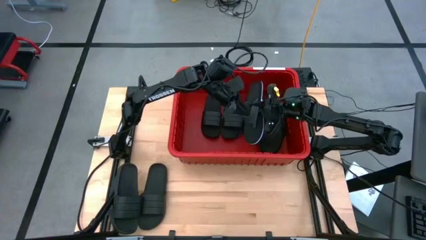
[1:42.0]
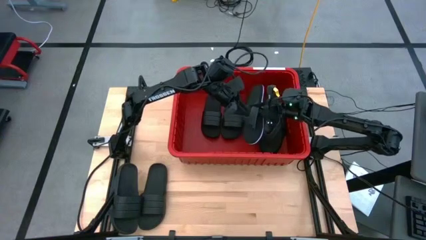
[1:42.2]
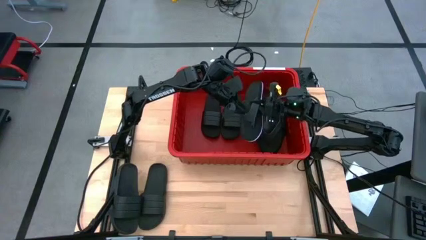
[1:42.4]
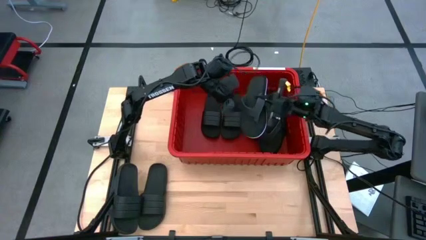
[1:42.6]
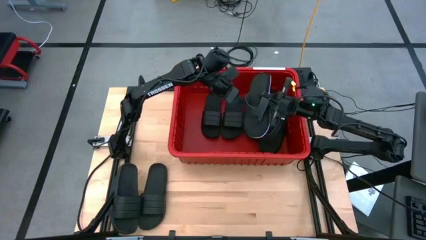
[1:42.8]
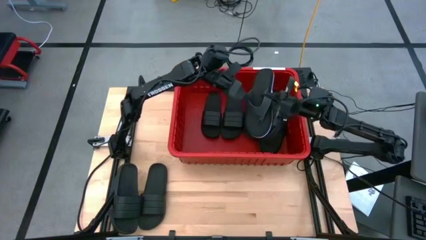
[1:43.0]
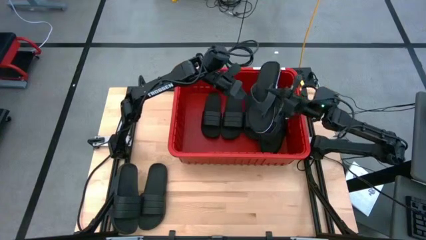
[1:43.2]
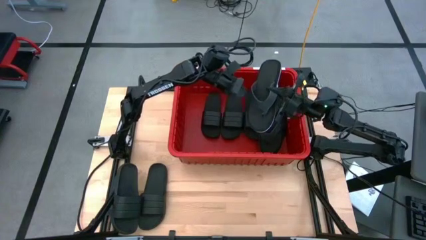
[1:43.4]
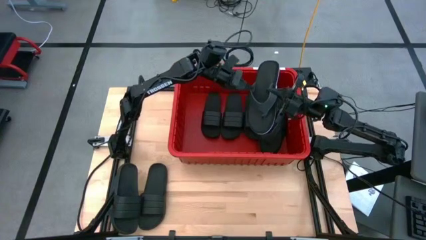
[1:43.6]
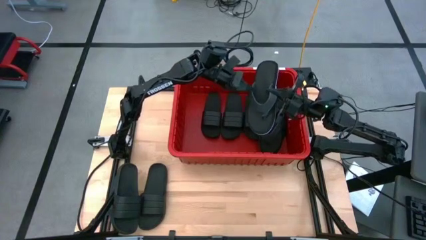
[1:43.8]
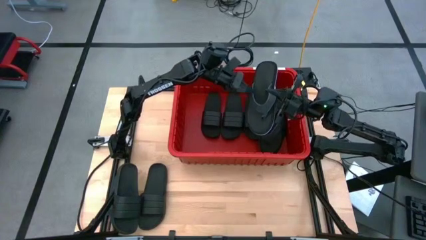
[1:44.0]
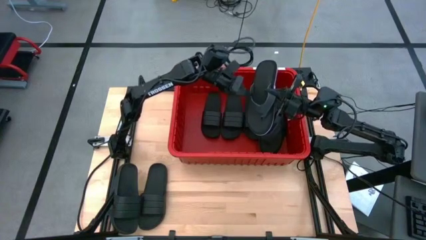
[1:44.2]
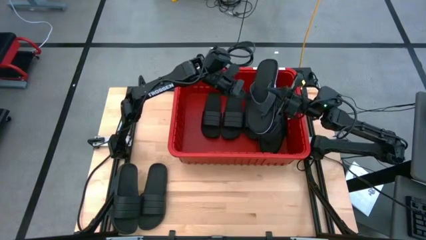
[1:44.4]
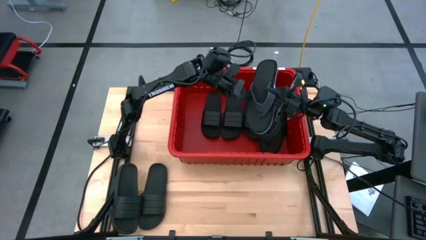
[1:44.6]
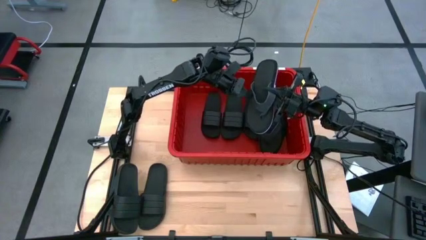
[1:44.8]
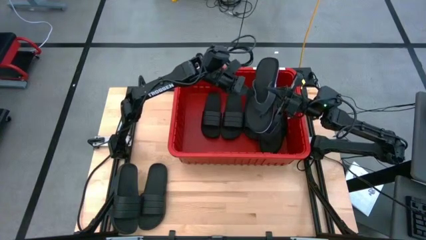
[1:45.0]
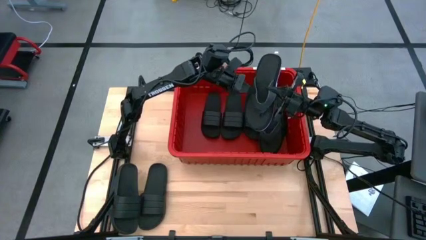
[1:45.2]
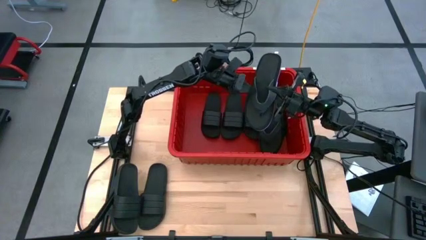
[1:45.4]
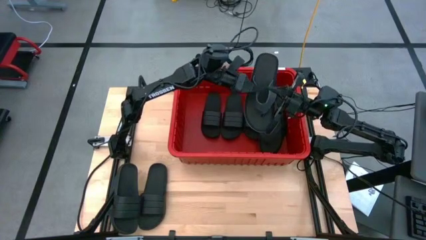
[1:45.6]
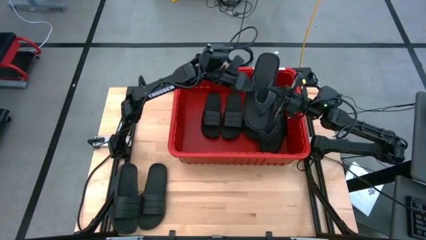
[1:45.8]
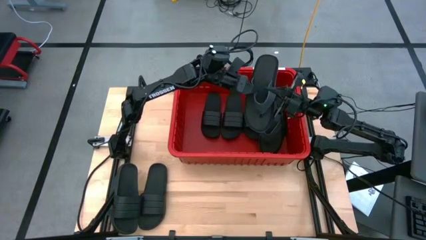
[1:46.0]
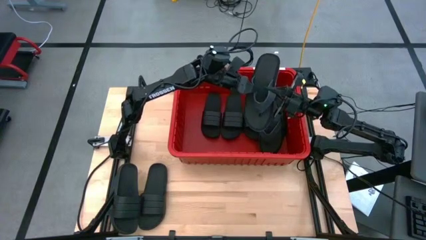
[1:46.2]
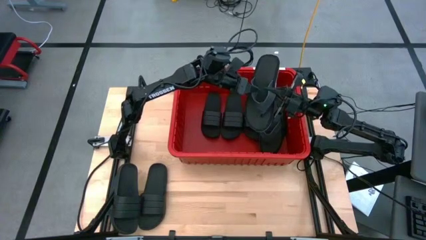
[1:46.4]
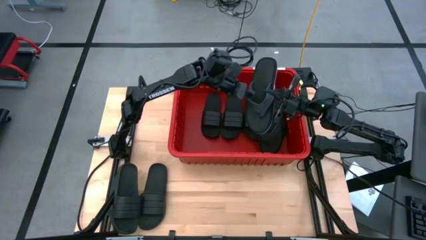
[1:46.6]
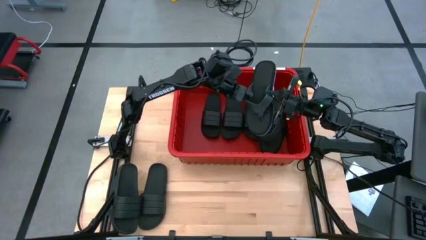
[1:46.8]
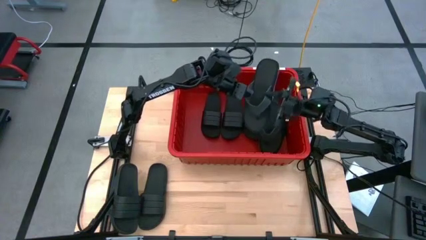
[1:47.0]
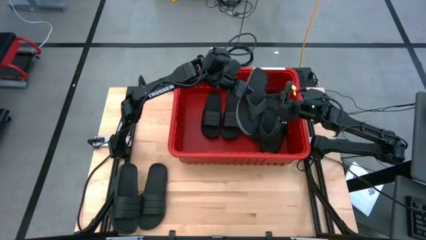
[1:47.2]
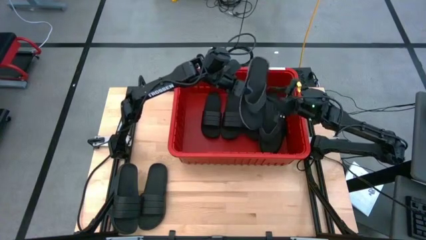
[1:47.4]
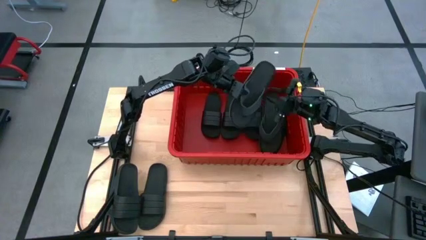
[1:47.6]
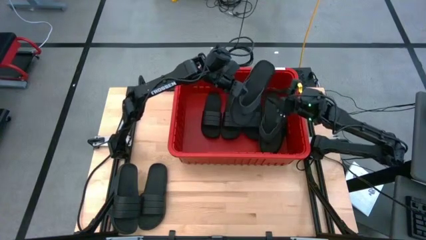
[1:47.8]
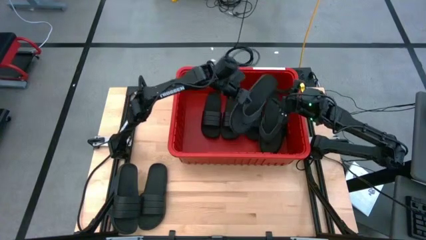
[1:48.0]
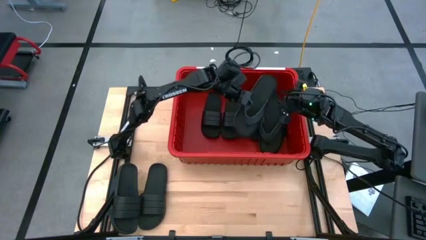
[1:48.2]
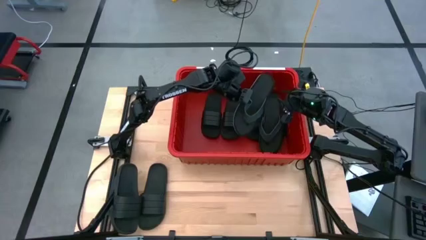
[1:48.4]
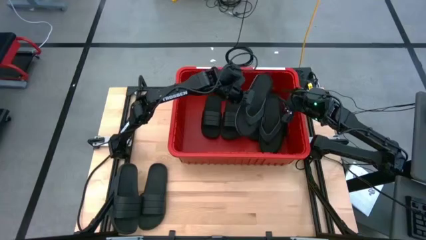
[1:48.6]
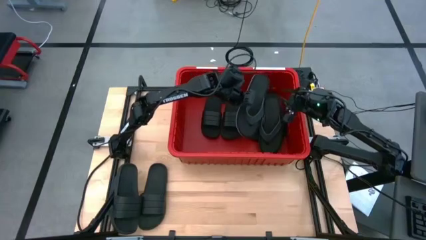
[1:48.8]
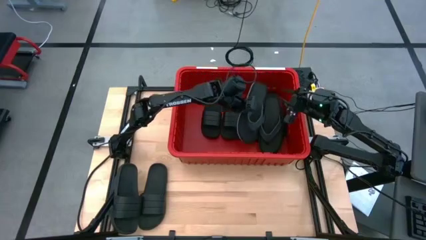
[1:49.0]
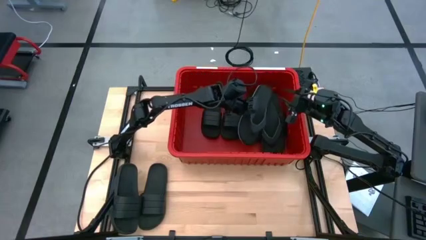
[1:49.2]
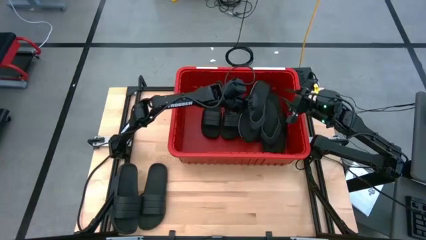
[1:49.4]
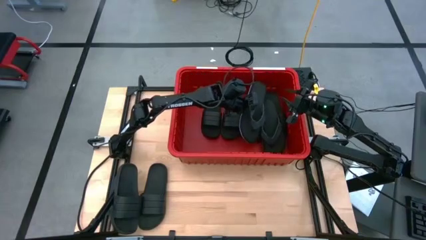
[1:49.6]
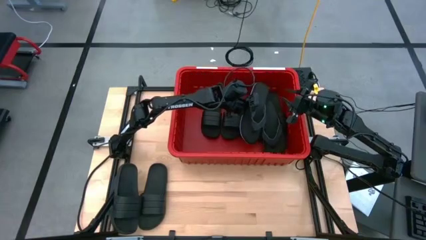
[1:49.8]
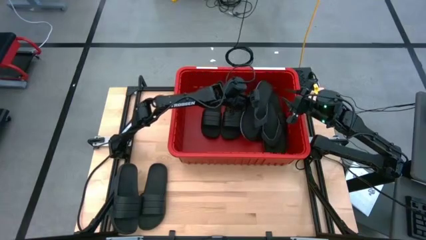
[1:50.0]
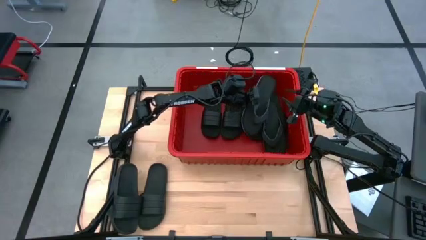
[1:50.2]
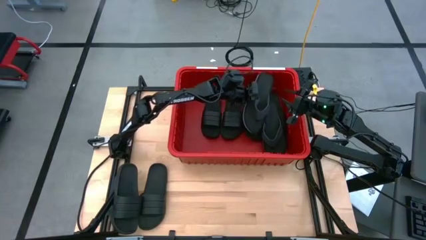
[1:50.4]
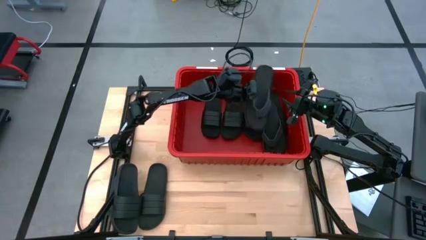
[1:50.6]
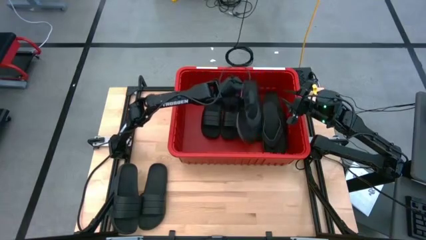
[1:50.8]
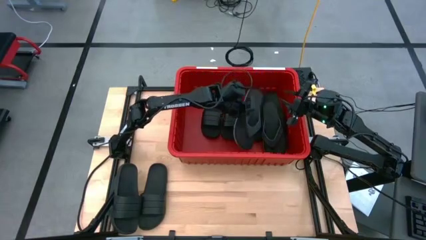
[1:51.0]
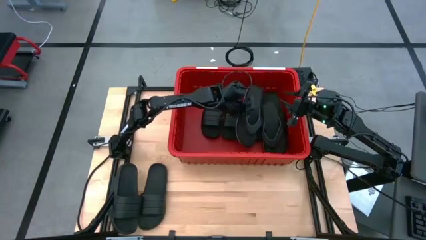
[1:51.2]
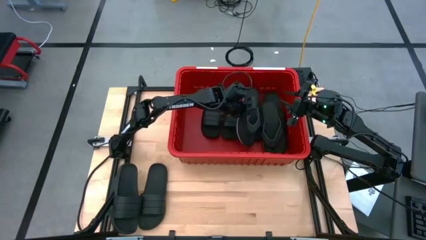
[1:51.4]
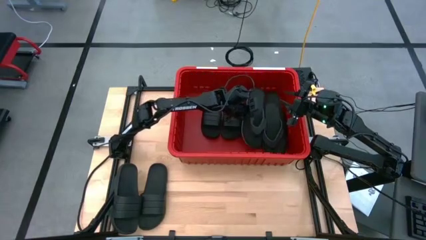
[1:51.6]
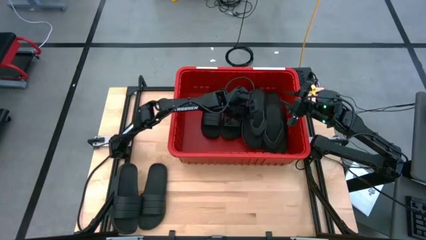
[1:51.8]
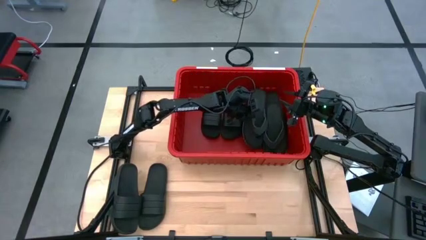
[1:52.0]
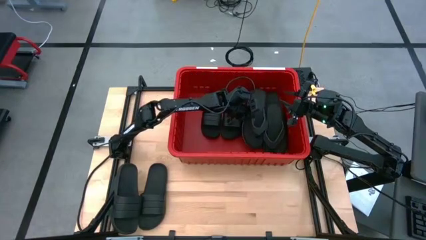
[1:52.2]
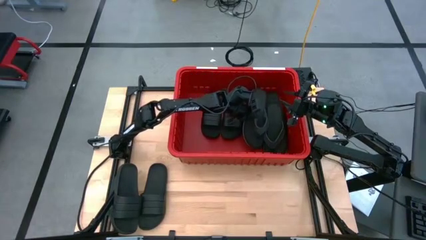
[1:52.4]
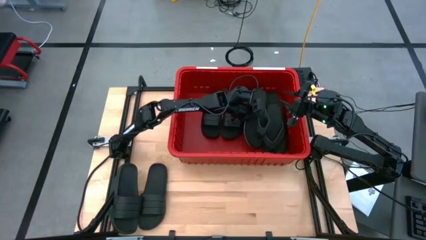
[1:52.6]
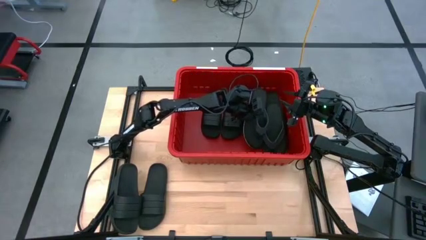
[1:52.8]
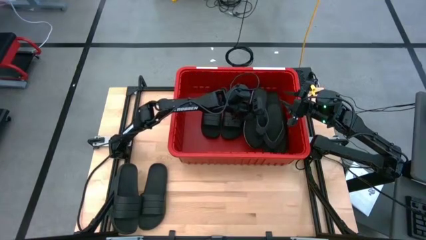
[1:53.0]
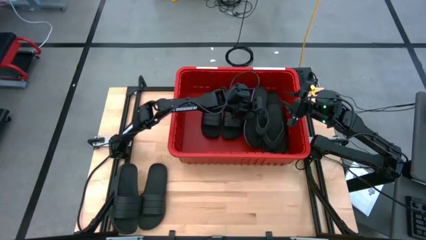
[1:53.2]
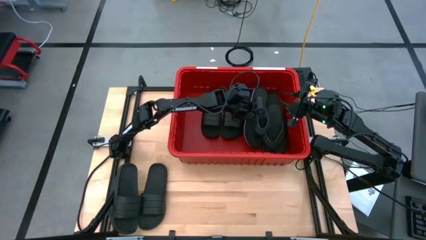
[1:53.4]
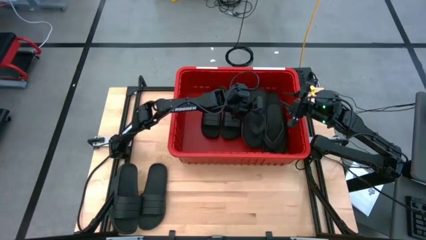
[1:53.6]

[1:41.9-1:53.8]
Task: Pick and place slides into bin
Put the flip flop into the bin

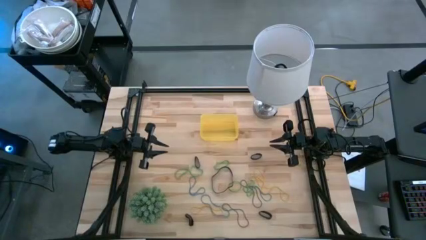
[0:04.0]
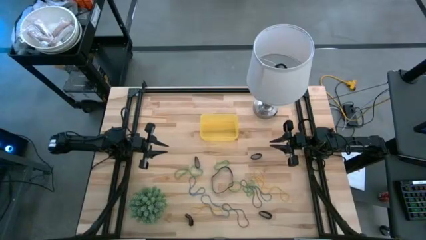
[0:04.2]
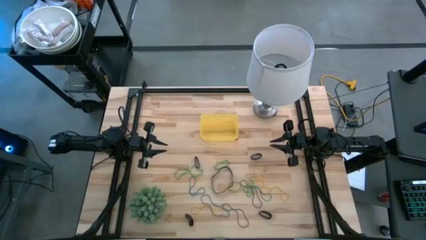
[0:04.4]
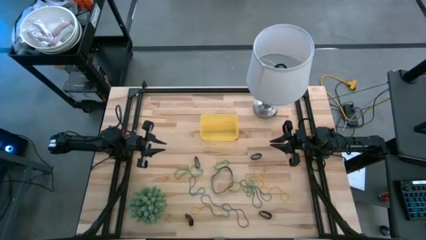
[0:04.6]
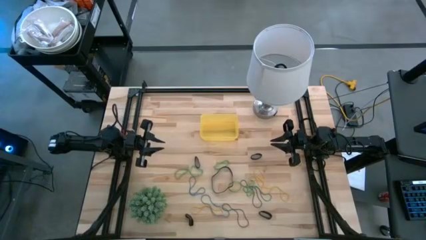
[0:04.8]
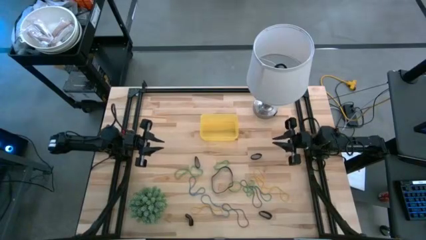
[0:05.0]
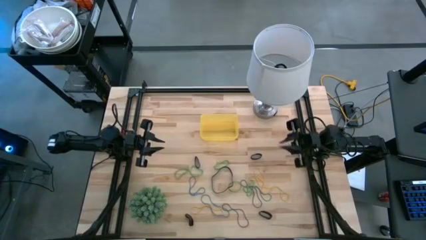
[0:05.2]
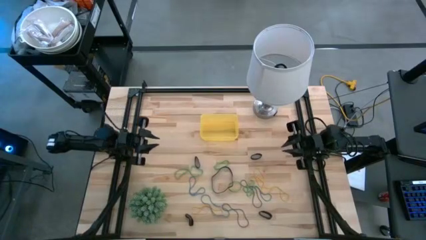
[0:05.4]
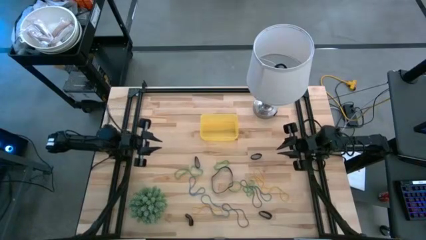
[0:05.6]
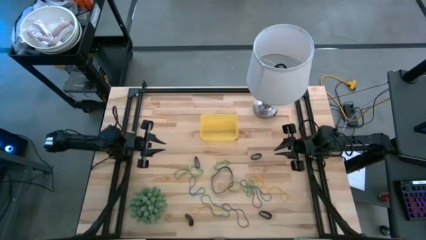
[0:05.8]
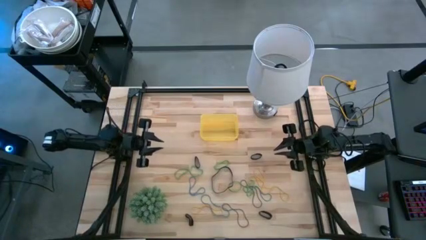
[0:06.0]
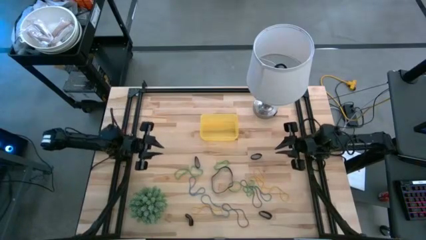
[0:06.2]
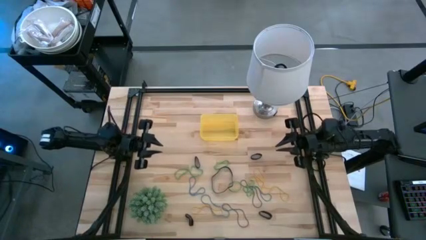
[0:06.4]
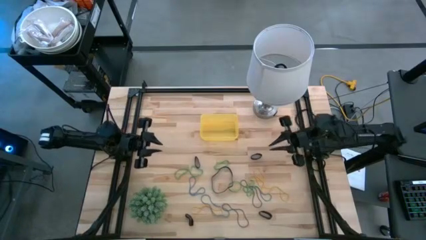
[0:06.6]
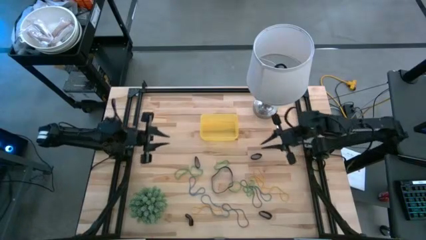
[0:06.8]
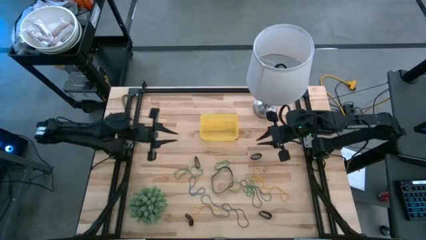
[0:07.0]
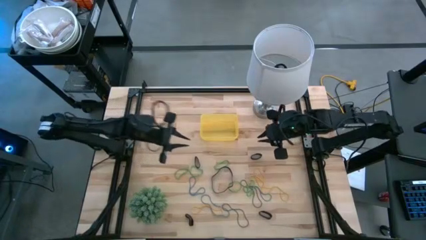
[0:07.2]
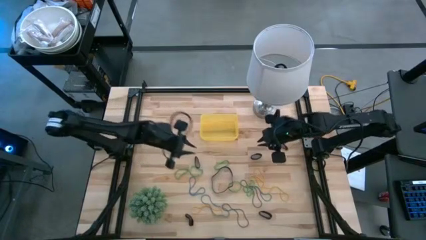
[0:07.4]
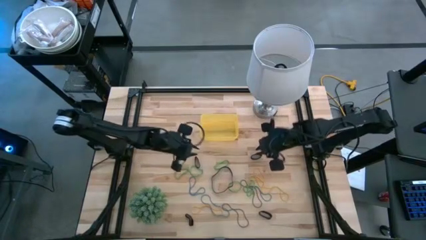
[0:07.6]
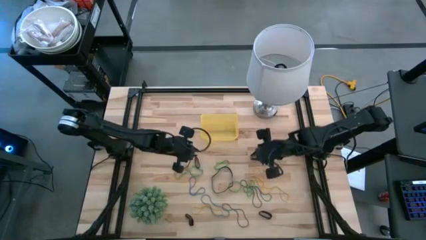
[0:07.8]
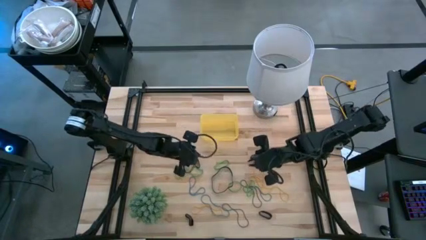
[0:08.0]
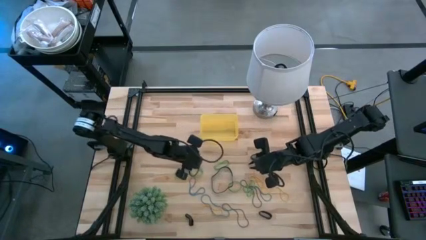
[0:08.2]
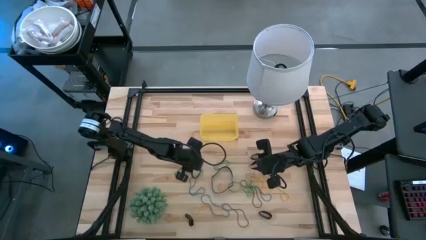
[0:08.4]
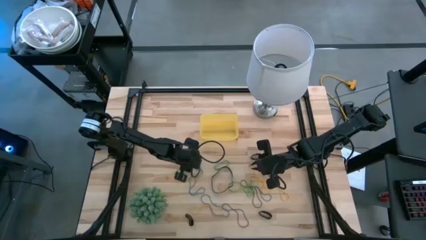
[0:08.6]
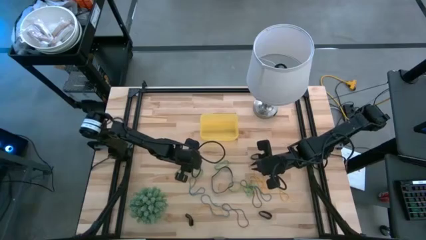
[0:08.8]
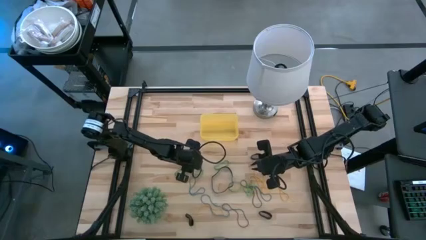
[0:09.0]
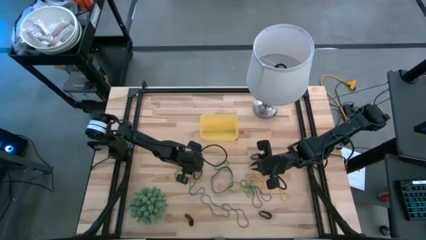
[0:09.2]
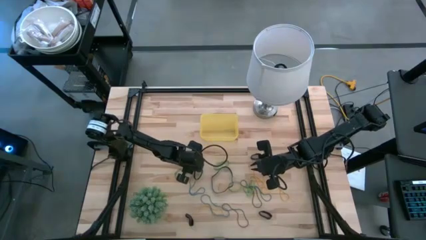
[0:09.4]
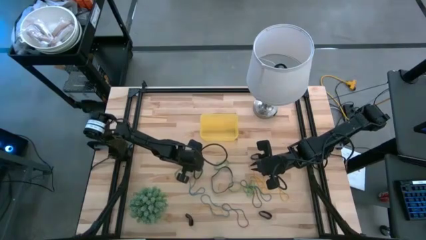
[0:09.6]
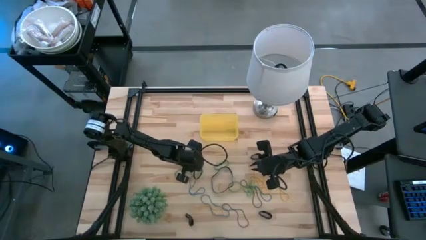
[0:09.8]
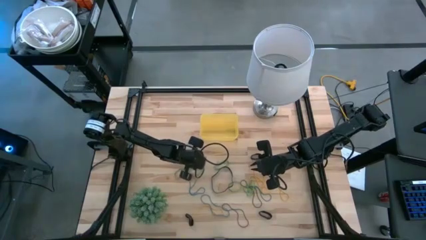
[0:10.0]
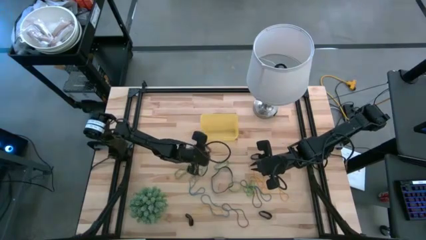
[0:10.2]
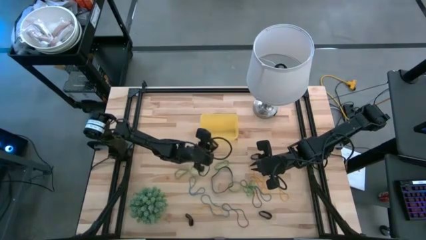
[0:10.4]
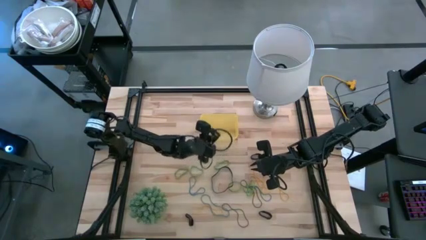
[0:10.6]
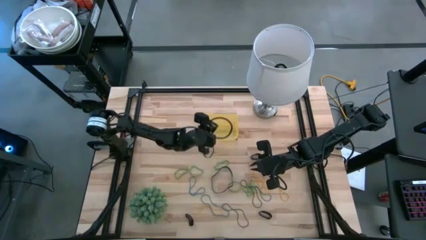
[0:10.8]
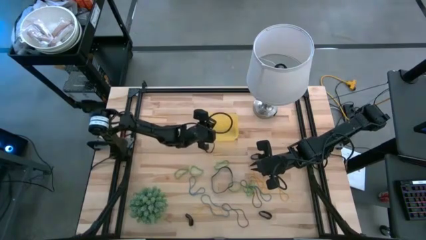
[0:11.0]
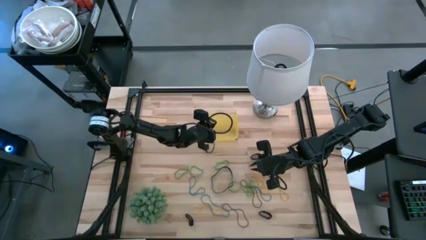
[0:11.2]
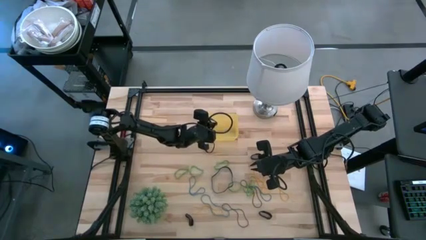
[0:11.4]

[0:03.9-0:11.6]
Task: Pick and place rubber bands into bin
Put the black rubber band into the yellow bin
